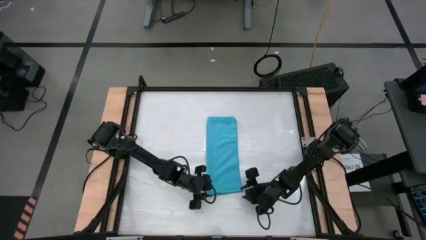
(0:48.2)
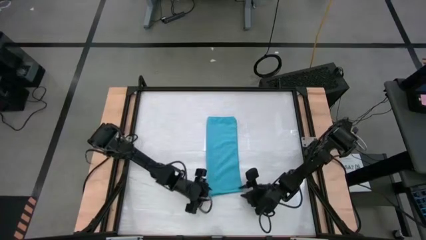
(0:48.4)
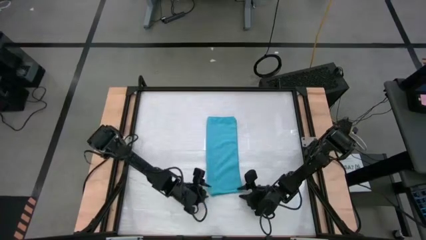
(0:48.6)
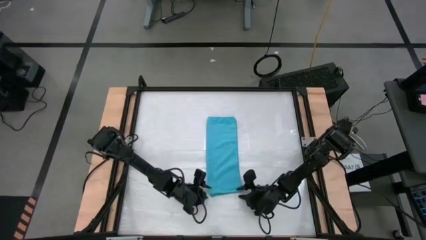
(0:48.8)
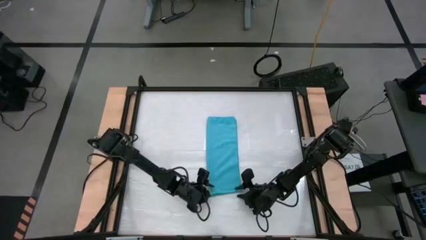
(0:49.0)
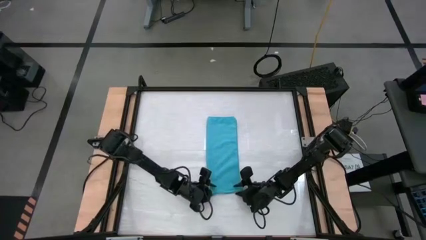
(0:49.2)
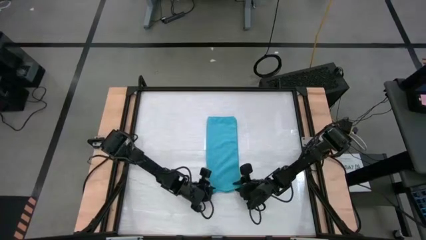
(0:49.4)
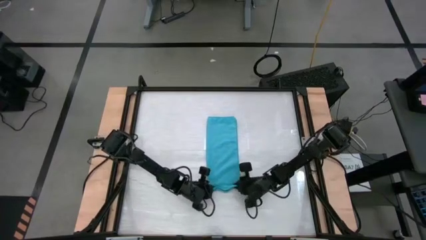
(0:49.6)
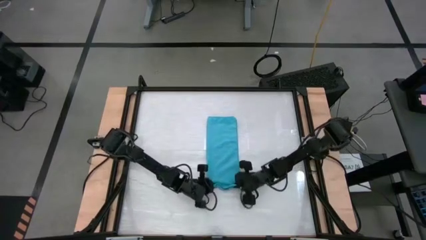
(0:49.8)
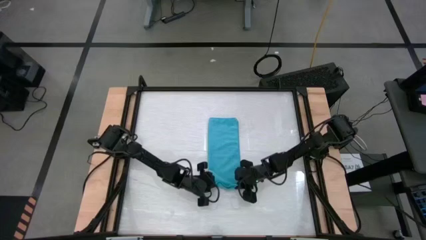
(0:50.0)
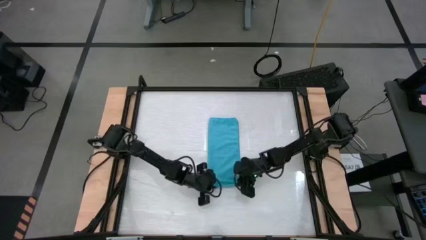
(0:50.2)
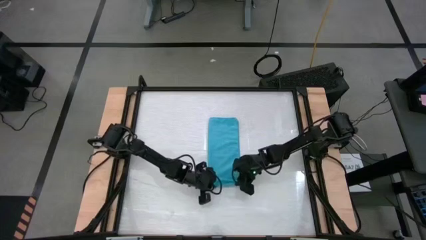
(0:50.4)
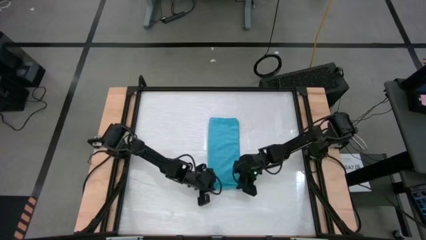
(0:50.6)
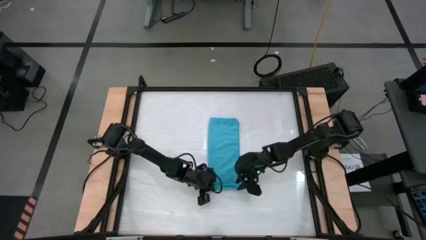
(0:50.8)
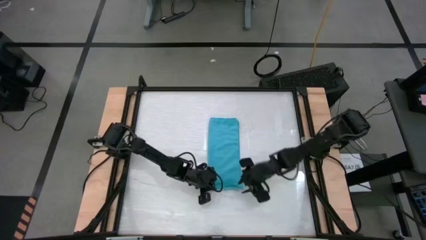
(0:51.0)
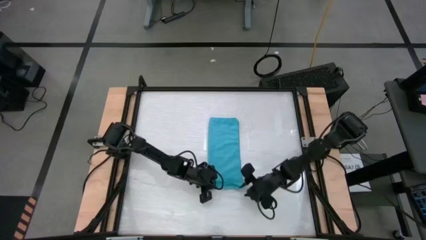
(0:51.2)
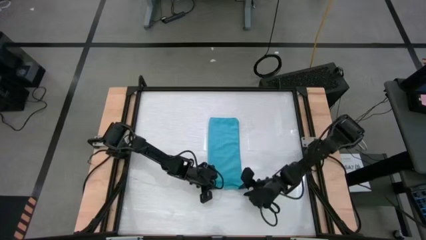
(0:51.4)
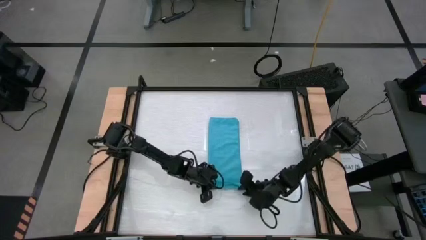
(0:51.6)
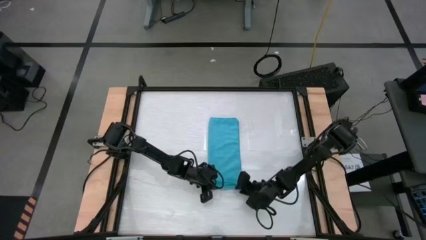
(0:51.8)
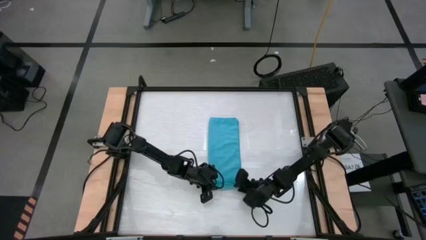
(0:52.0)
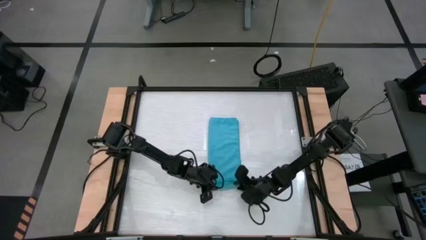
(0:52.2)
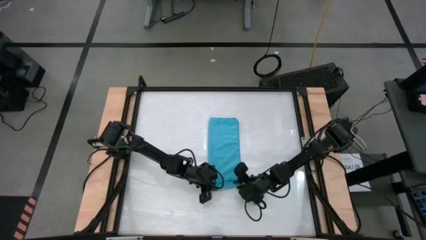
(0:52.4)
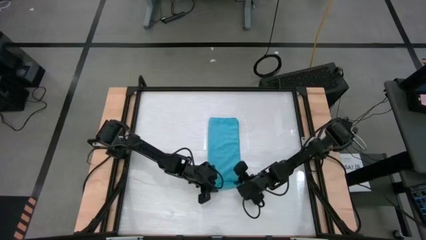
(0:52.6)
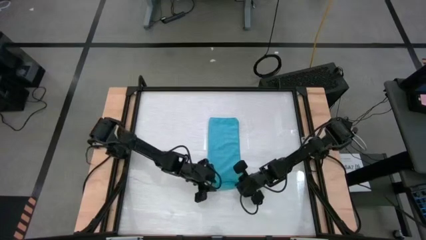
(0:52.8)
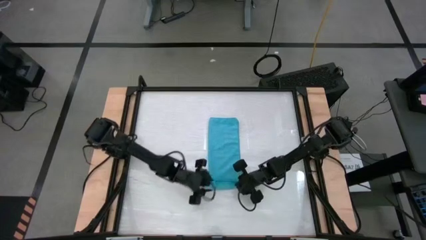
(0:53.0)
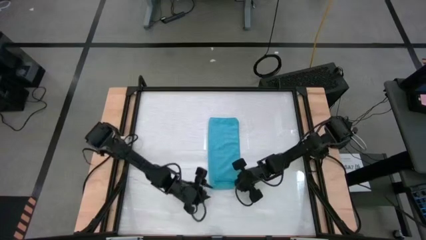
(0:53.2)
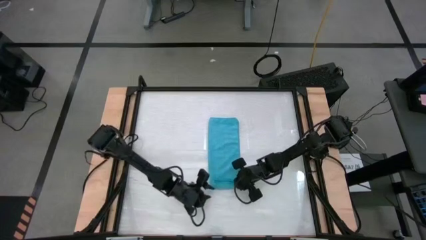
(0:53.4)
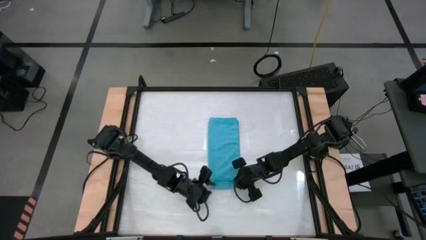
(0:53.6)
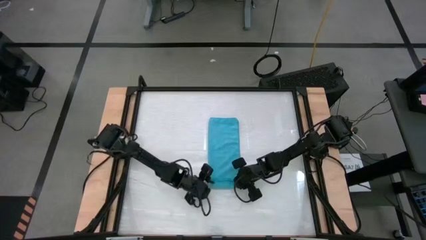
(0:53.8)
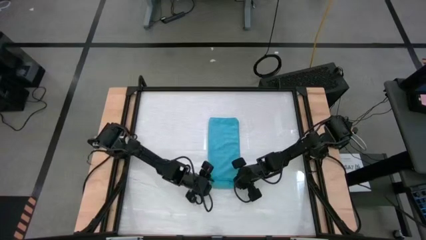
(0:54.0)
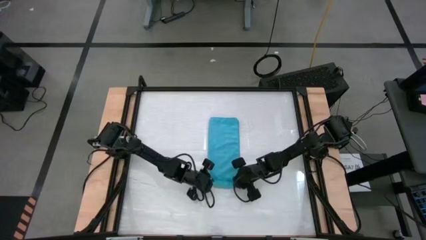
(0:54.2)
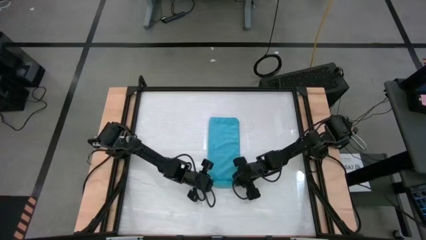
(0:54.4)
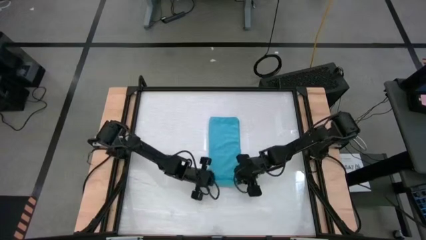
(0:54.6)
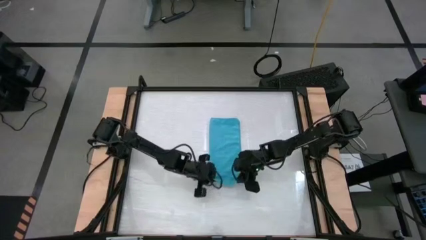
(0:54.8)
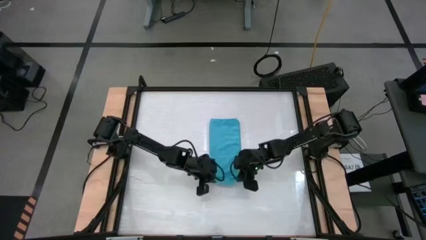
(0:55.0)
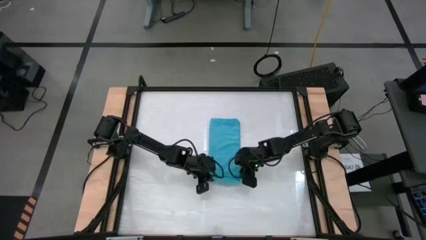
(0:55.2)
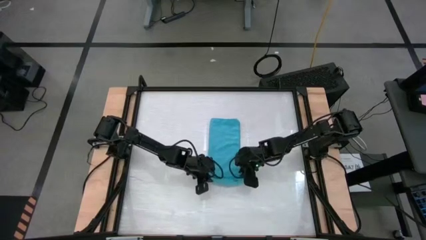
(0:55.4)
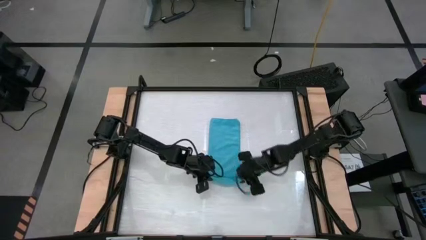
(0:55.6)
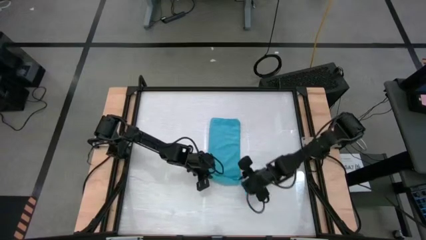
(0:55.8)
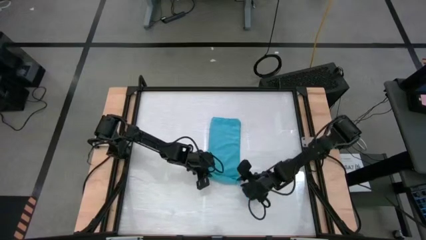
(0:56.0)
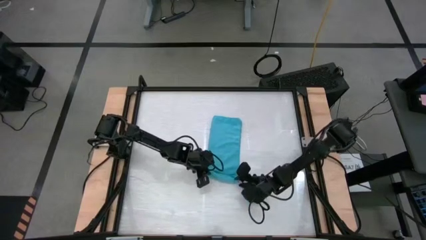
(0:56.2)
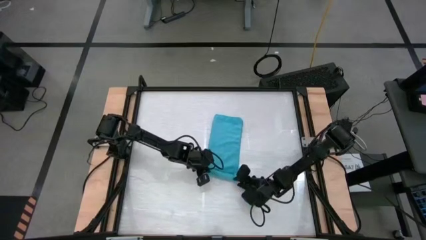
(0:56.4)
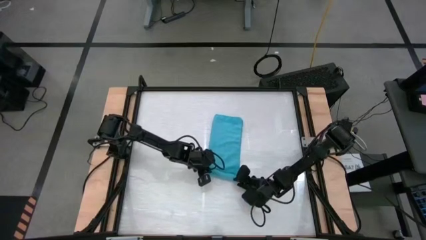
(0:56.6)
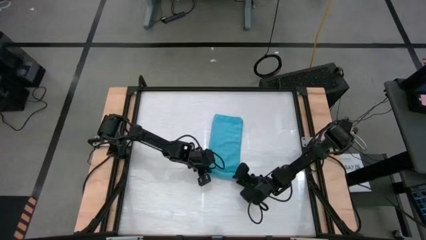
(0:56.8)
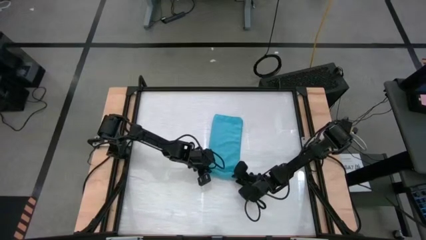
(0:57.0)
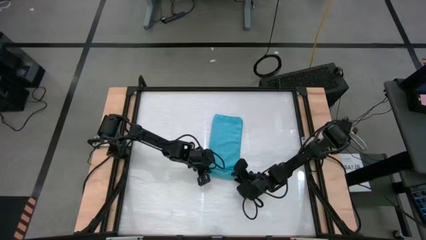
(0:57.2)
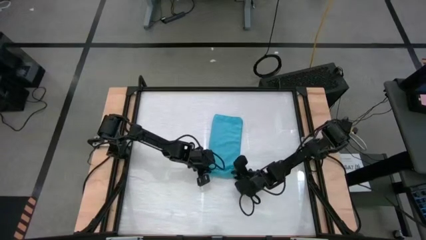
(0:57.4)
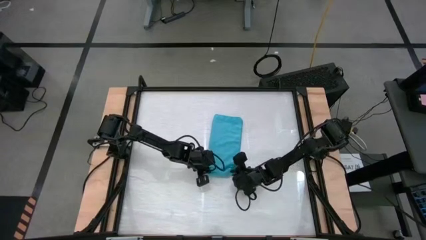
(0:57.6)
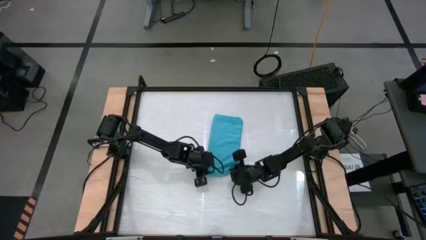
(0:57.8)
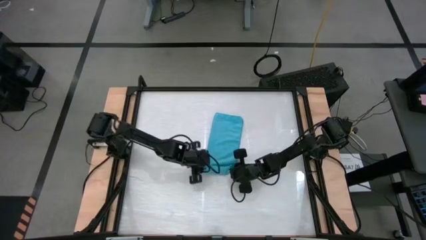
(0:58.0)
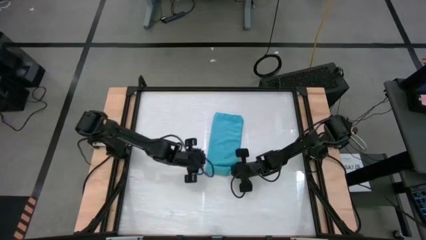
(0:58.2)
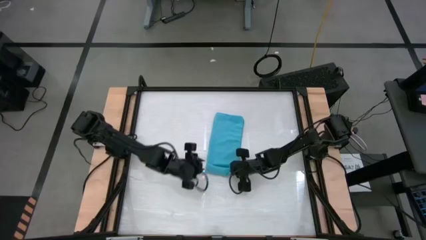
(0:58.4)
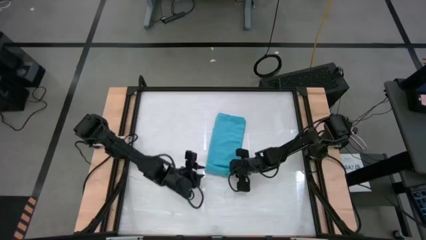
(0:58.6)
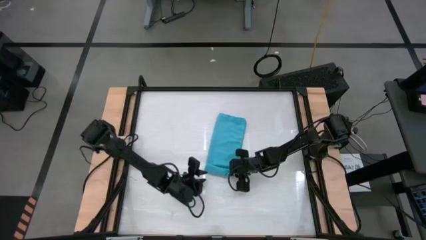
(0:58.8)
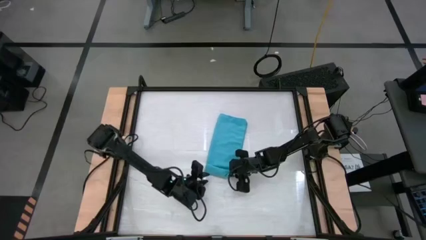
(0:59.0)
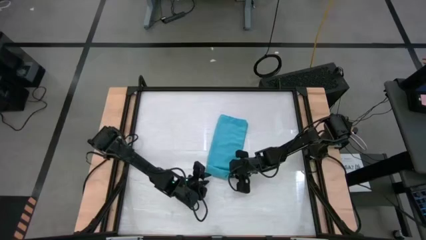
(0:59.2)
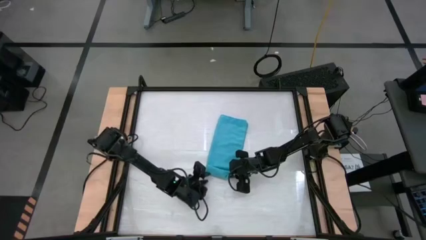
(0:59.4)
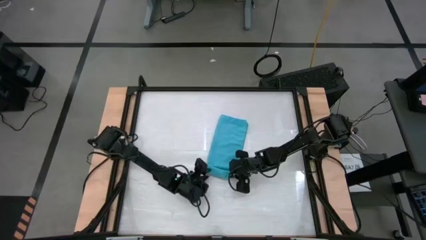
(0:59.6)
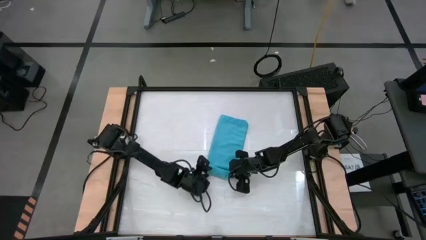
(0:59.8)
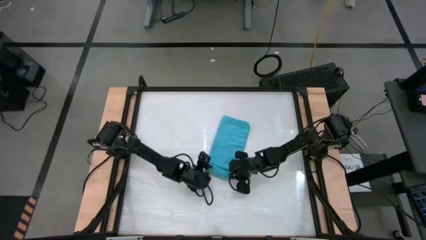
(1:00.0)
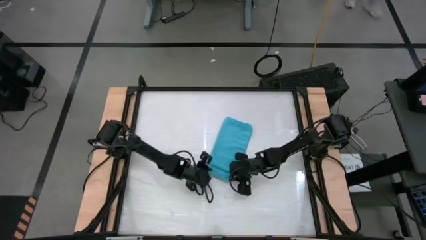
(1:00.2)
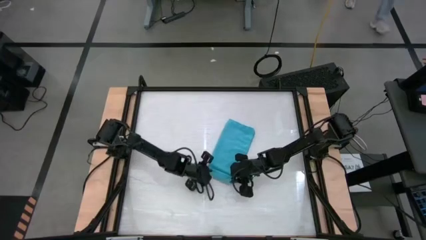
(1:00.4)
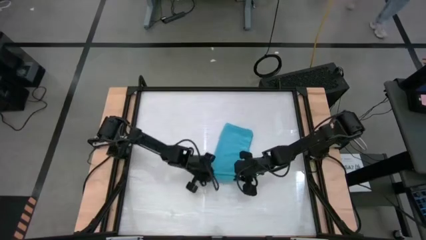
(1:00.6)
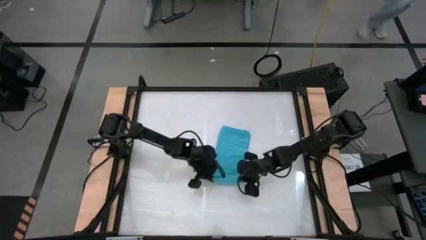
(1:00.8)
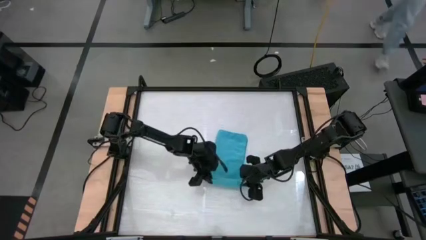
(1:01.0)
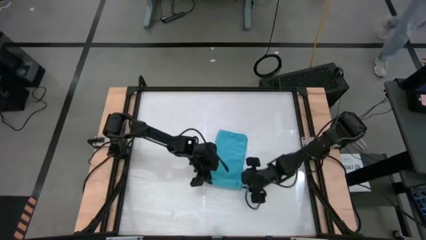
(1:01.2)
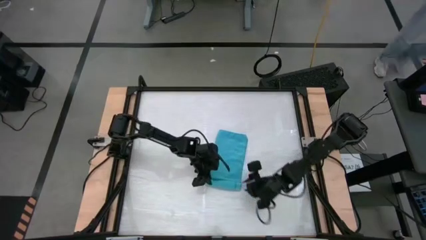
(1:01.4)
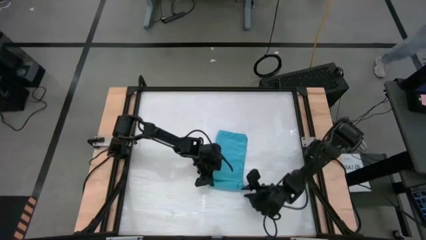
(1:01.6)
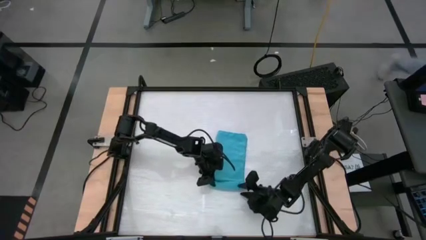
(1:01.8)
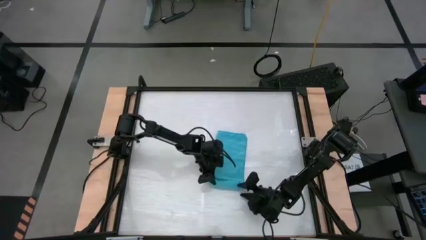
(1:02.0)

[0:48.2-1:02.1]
Task: Roll towel
Roll the blue towel

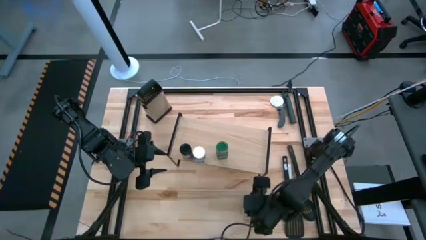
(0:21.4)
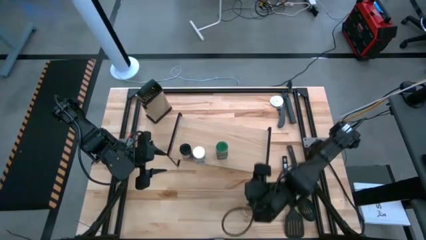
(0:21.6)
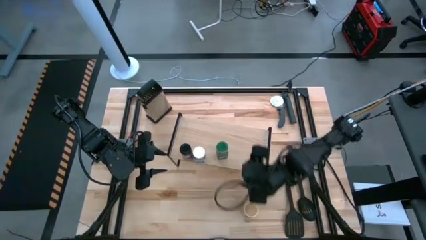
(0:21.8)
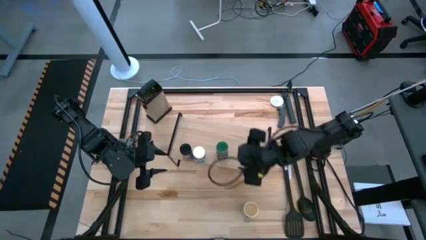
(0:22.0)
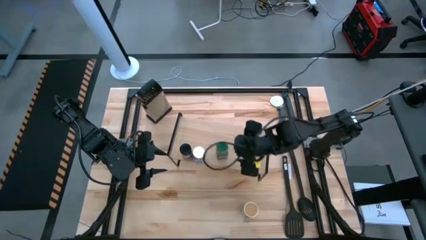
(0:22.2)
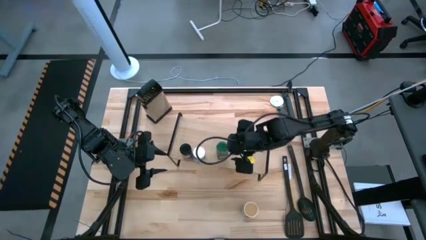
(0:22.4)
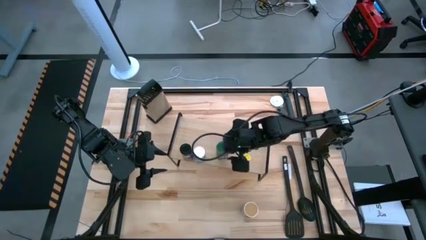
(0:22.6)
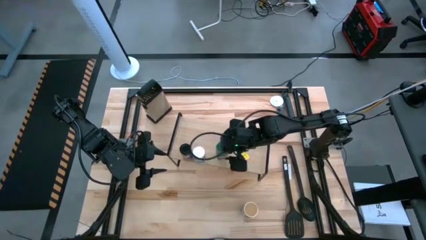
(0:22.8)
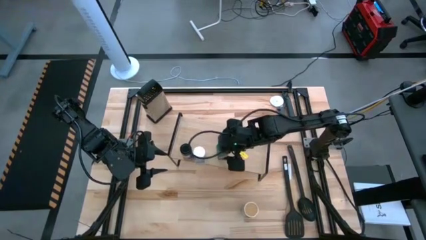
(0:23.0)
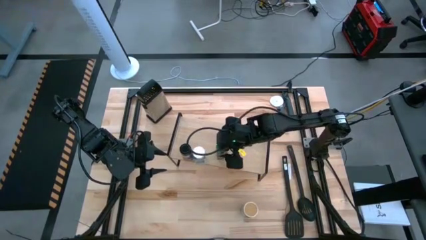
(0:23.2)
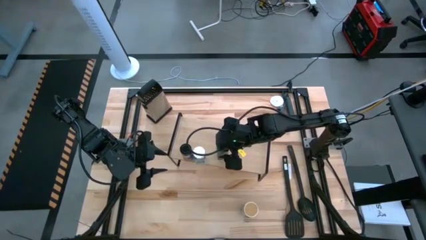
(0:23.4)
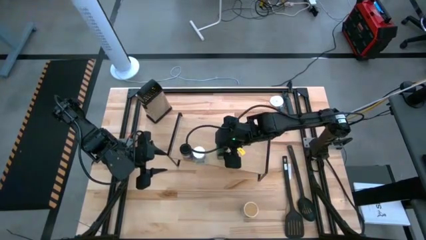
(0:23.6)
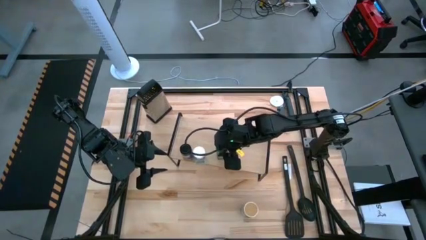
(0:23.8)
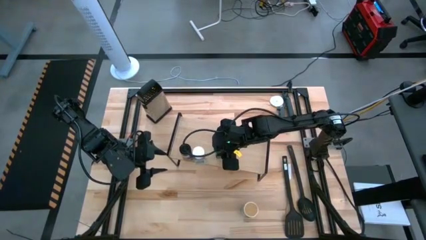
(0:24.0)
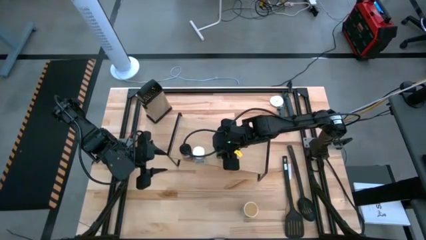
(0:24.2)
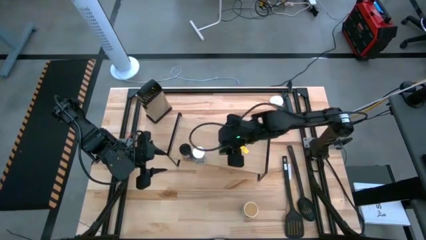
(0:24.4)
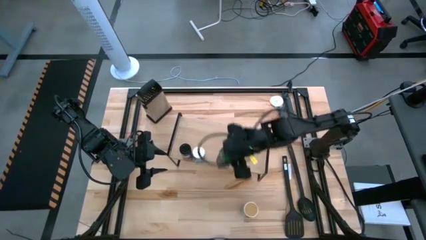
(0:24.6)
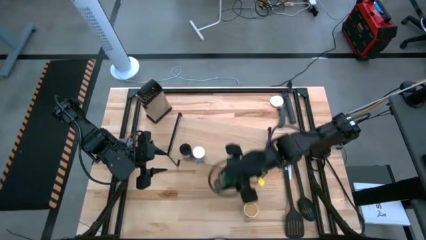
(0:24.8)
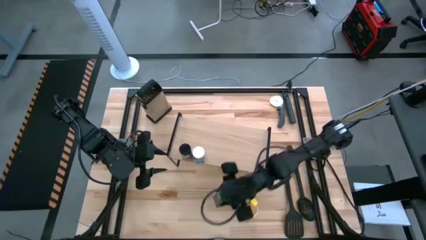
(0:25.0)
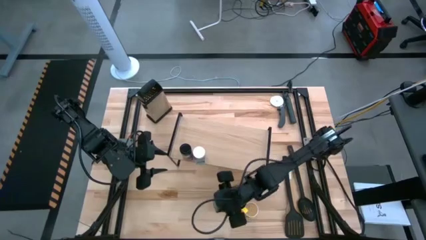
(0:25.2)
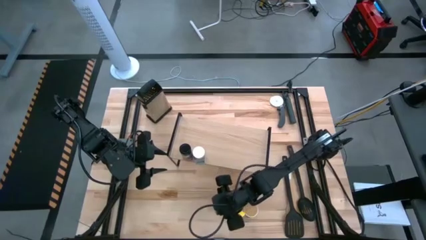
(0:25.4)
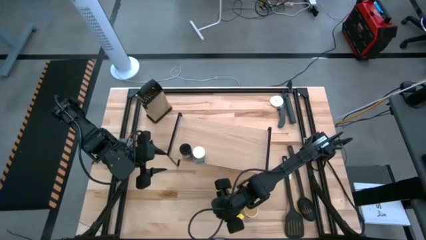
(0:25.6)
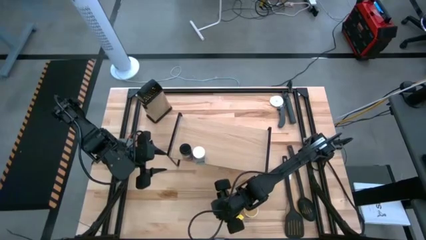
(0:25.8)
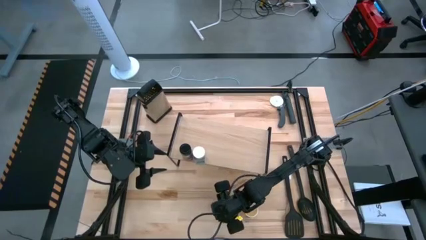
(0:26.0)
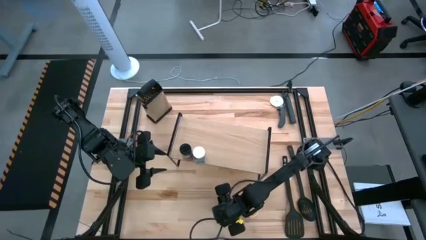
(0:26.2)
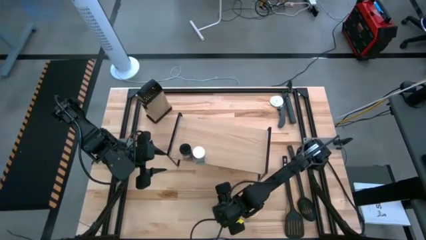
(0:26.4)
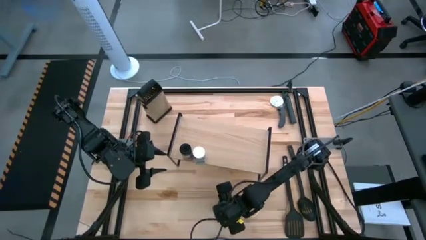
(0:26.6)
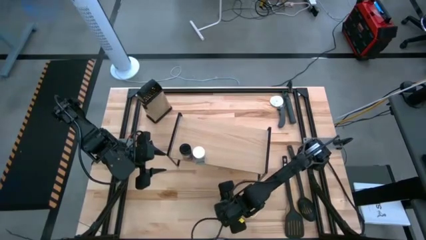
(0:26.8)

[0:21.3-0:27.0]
Task: Shelf spices
Remove the green seasoning bottle from the shelf
